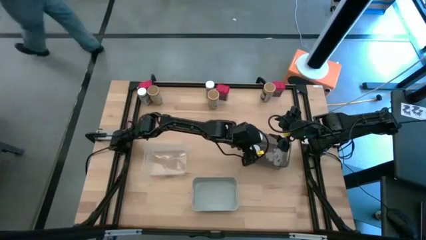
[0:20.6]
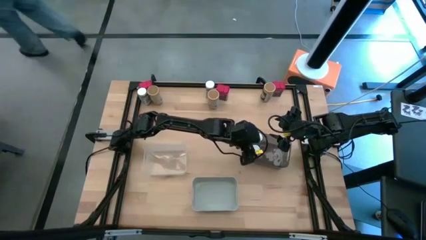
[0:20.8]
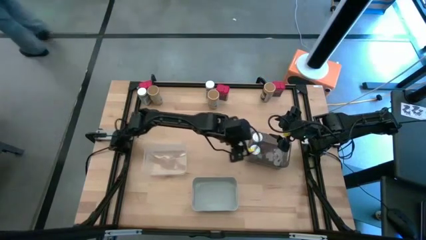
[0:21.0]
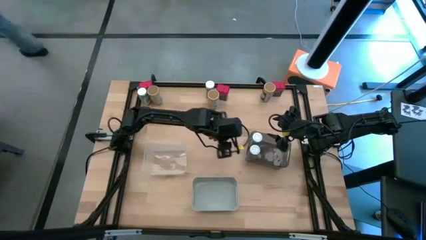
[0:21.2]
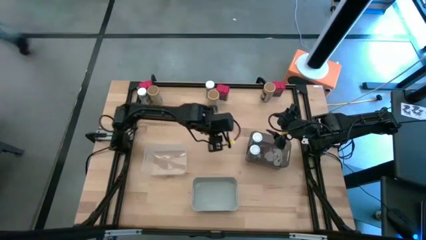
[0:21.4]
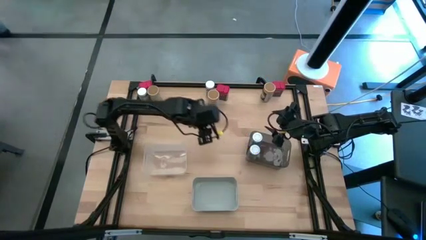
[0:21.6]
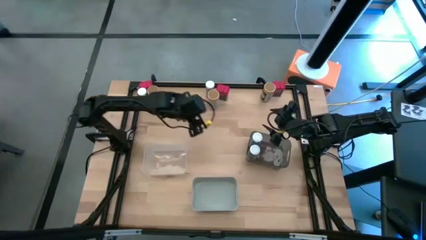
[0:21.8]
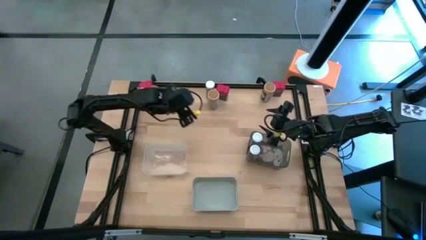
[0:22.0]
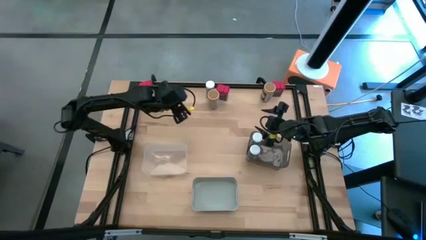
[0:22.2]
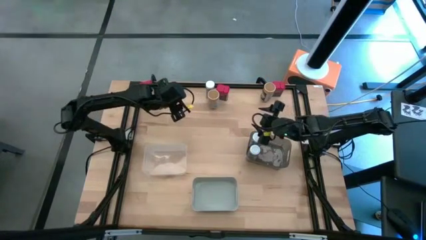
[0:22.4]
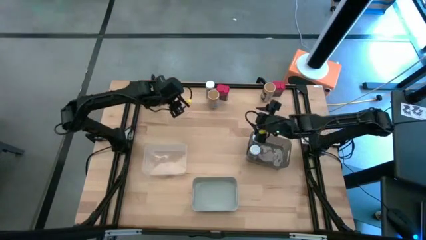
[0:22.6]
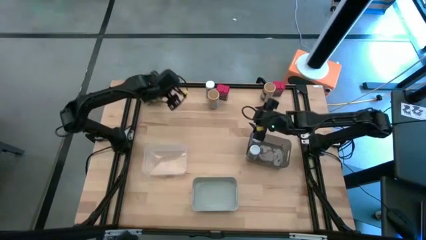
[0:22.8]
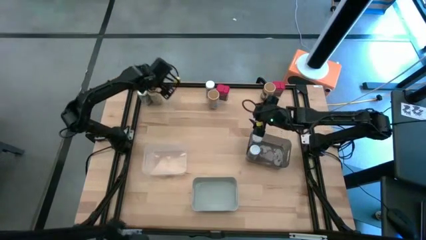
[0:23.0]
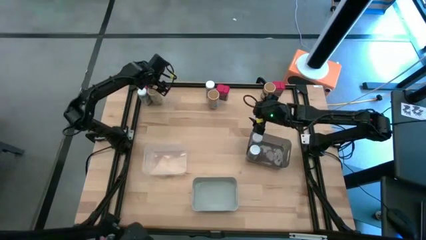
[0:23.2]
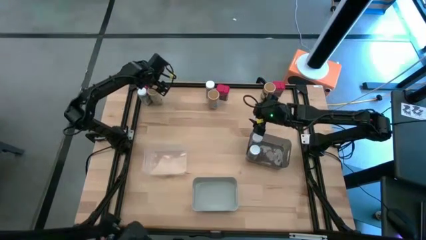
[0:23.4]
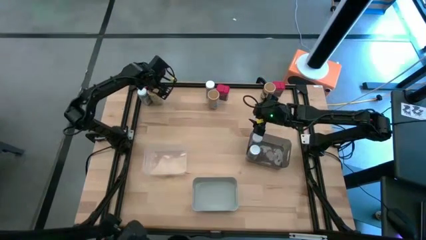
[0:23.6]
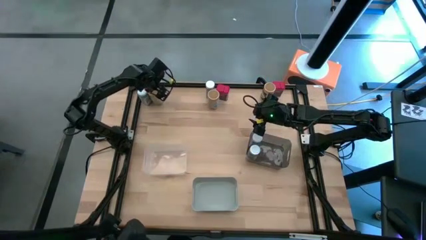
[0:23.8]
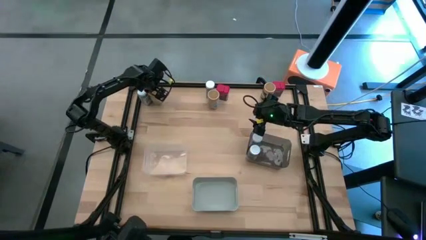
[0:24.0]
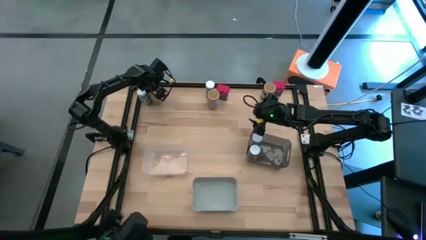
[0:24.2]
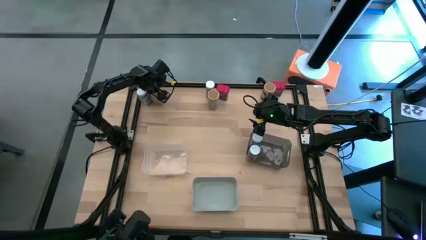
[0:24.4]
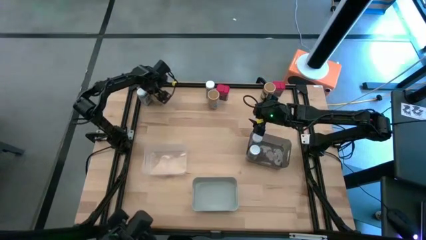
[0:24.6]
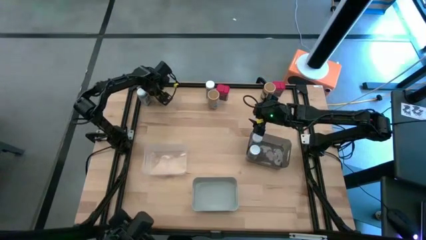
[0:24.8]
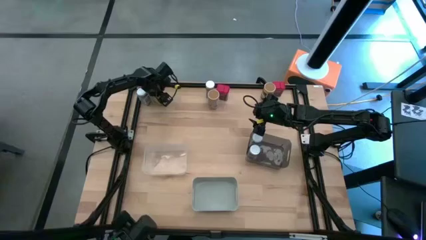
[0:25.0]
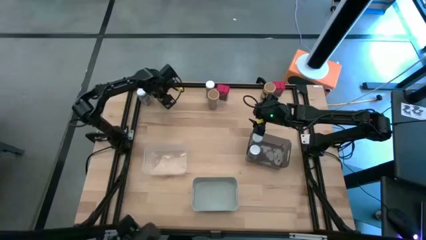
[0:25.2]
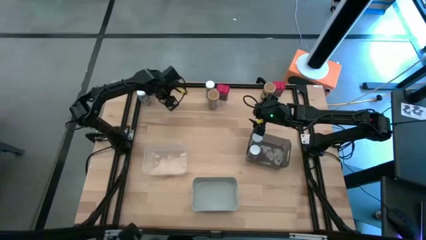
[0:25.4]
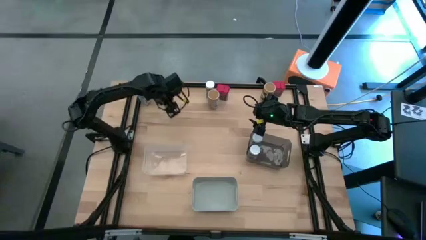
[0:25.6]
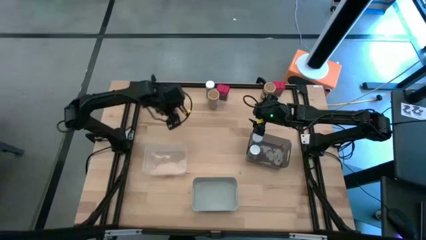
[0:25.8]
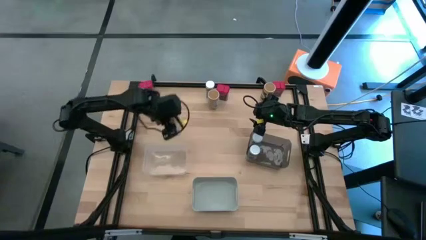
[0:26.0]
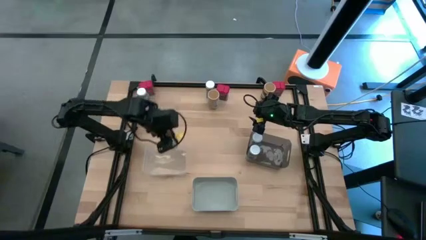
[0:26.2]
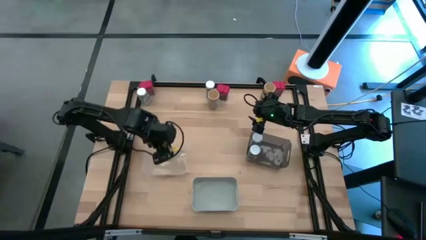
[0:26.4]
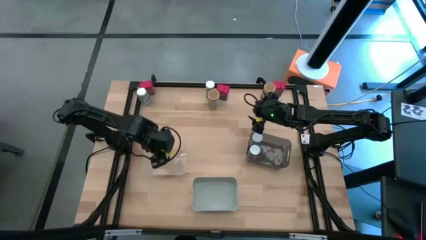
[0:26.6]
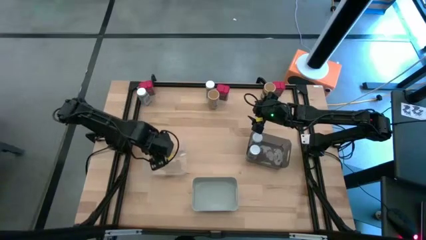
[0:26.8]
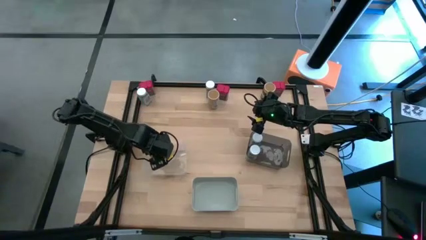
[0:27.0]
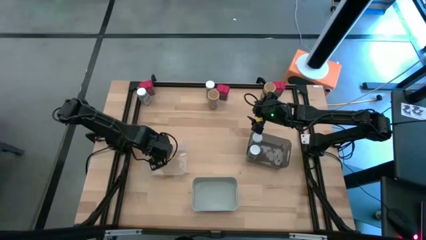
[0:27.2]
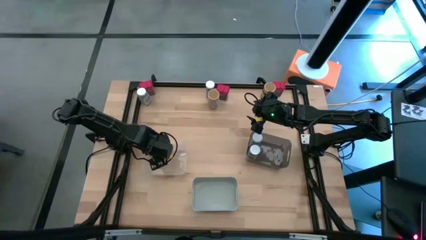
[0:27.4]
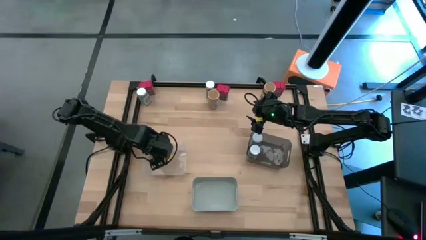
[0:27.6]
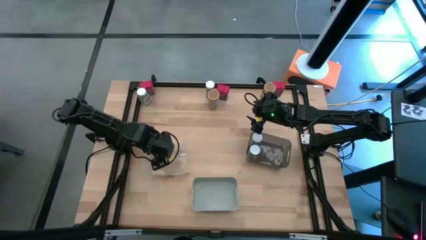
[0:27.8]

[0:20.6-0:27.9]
Task: Sort spices by type
Put the gold seasoning bottle into the transparent bin

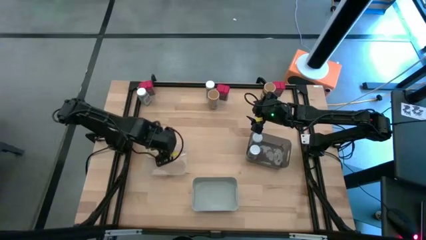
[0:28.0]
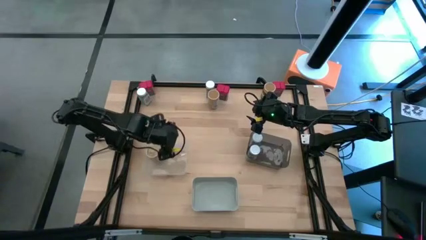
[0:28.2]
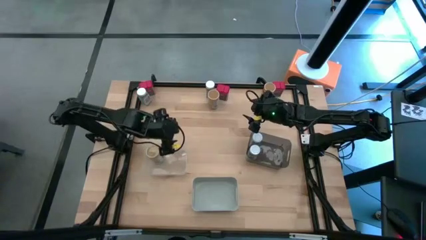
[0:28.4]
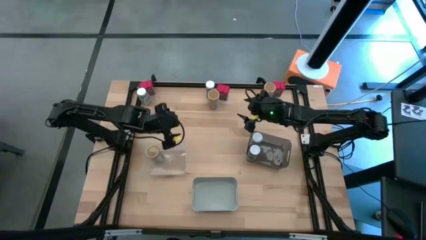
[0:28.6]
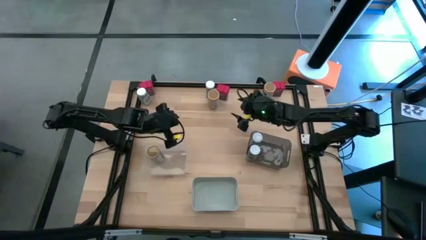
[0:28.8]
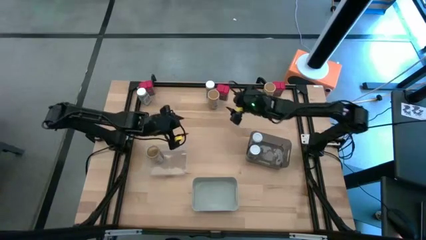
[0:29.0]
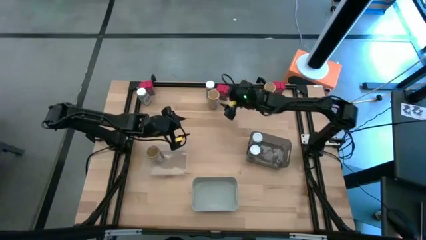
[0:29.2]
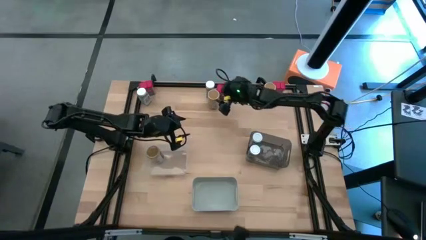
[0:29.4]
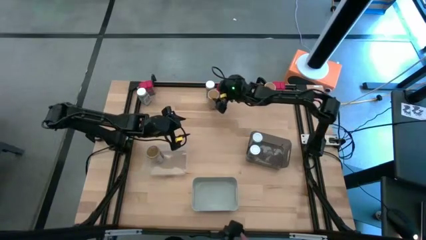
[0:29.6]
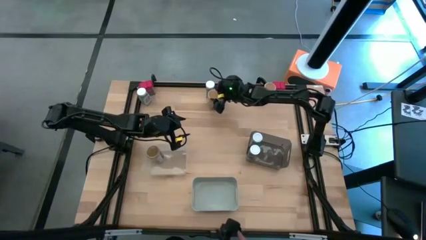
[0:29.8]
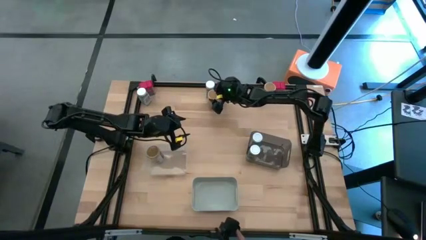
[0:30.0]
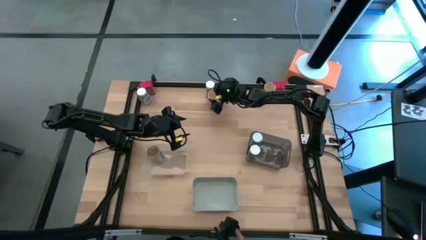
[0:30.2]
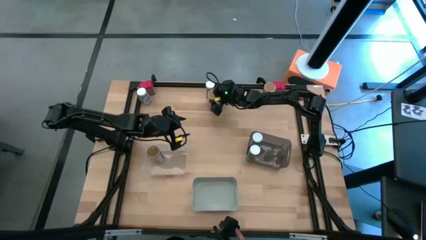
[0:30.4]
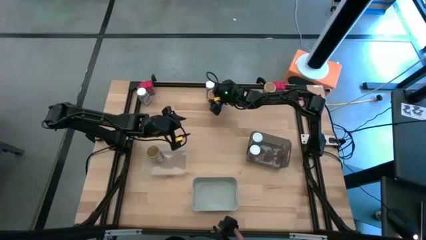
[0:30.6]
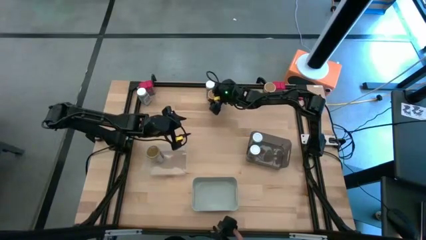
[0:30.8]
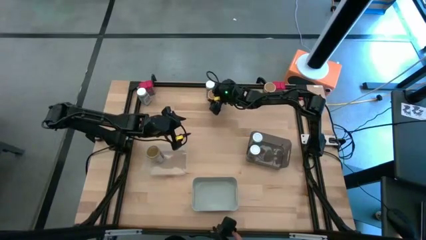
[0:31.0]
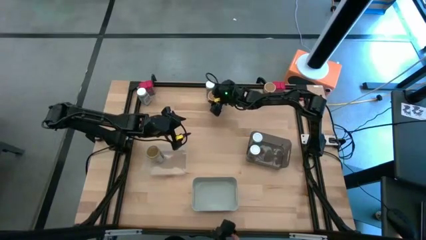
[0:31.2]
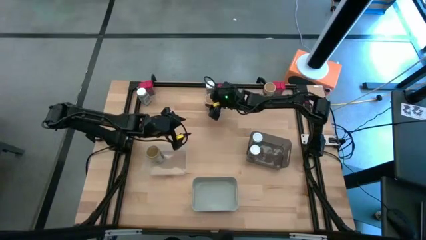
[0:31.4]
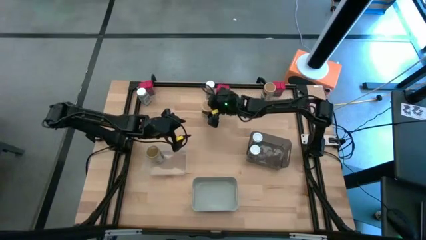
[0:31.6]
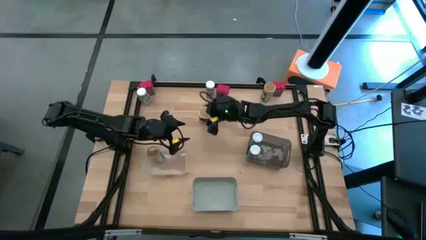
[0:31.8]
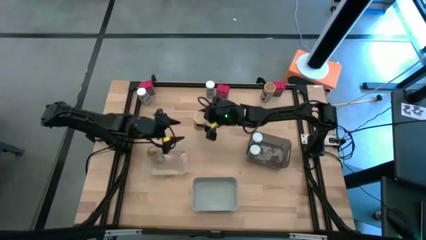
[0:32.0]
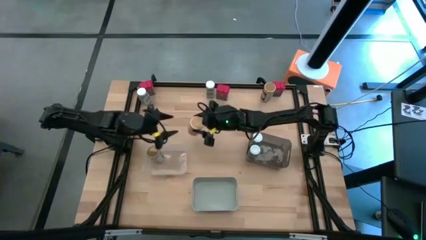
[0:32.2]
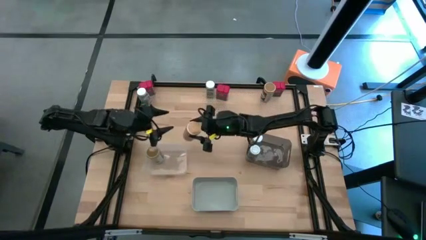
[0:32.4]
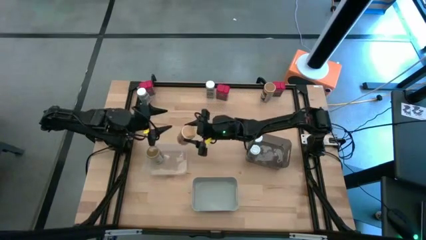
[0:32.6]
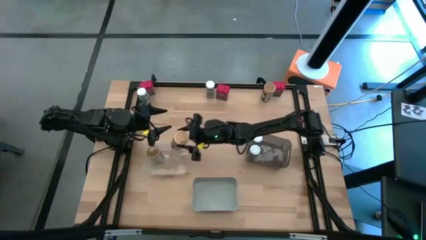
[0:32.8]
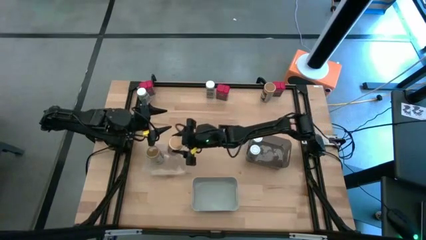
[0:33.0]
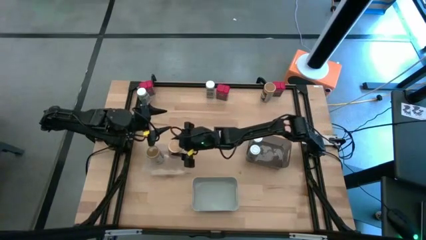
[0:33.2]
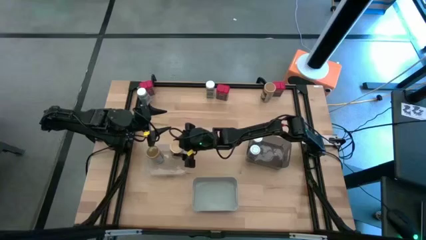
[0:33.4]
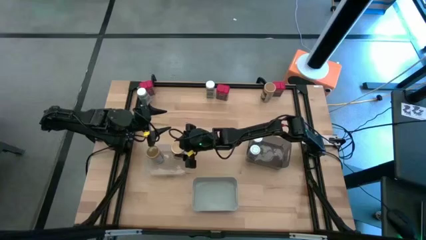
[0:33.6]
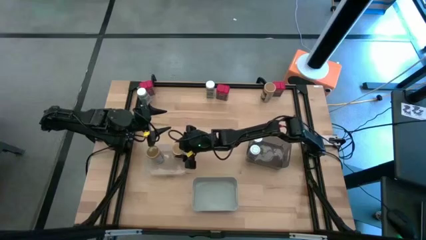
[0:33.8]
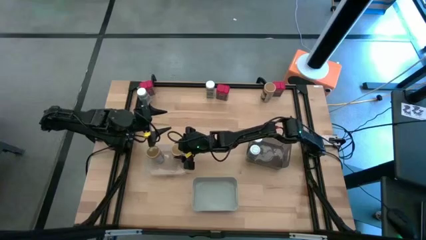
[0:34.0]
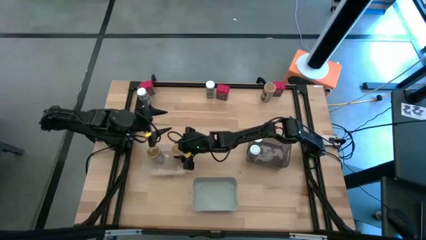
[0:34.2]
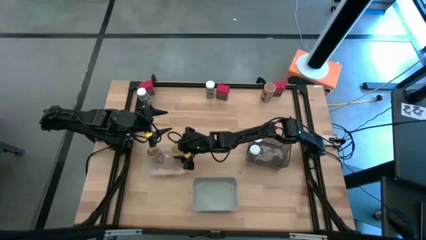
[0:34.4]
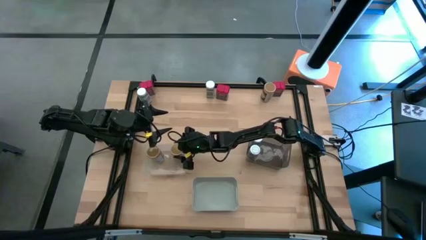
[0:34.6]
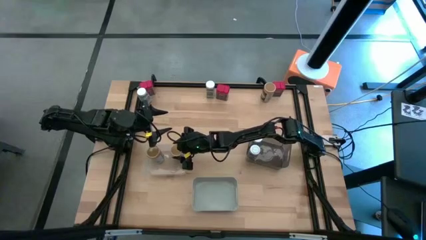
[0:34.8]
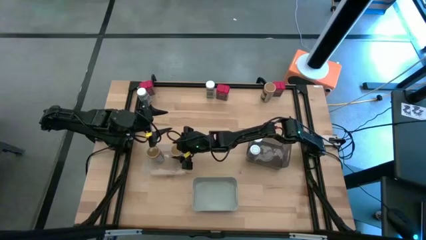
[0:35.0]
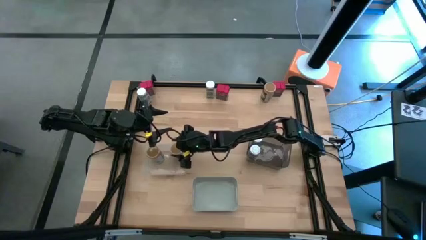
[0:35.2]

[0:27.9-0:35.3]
Put the gold seasoning bottle into the transparent bin

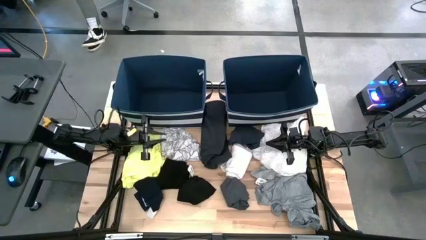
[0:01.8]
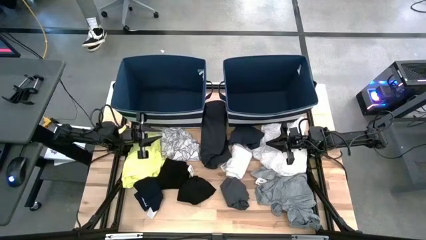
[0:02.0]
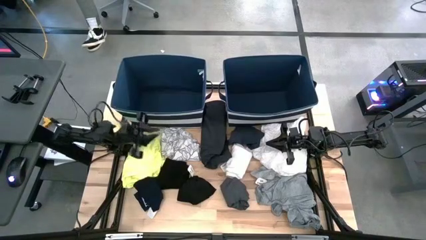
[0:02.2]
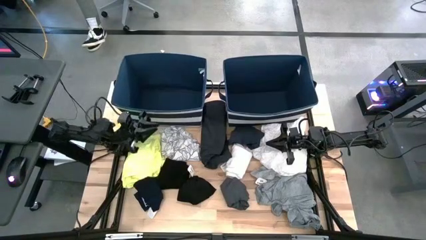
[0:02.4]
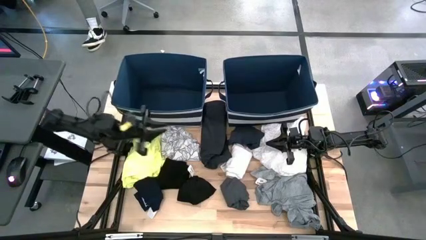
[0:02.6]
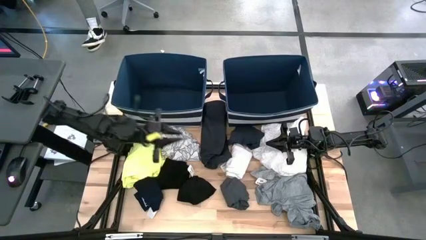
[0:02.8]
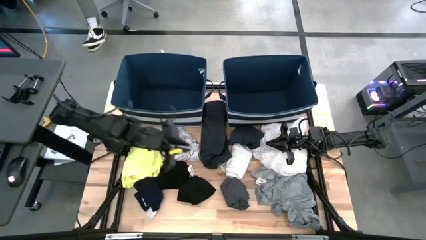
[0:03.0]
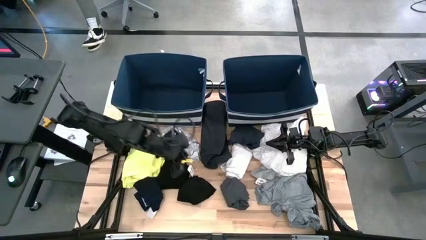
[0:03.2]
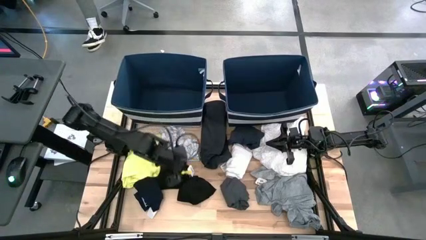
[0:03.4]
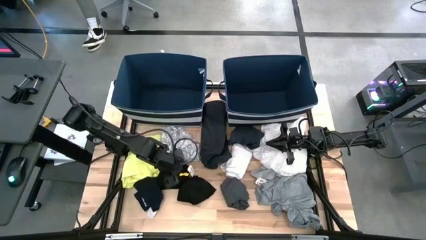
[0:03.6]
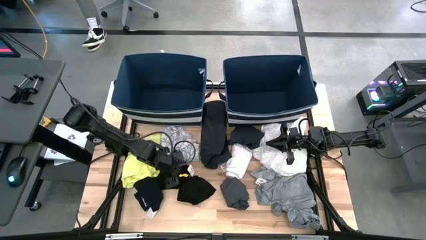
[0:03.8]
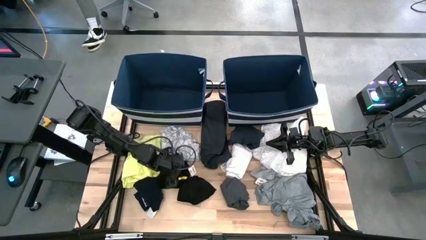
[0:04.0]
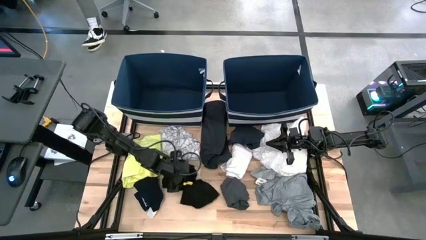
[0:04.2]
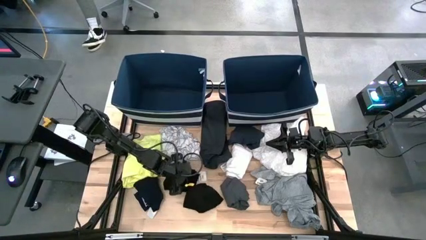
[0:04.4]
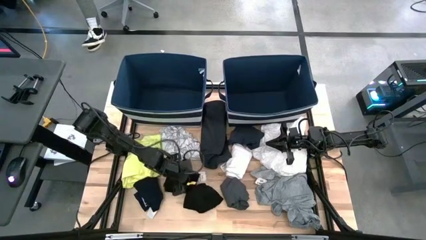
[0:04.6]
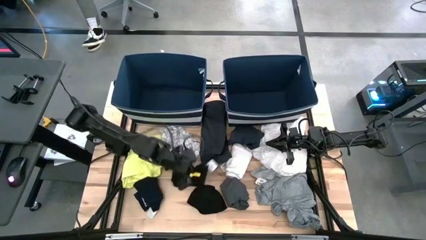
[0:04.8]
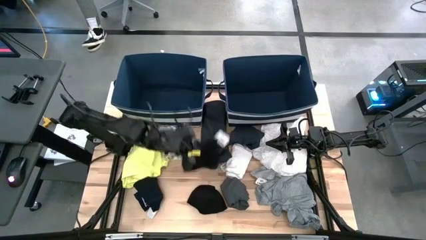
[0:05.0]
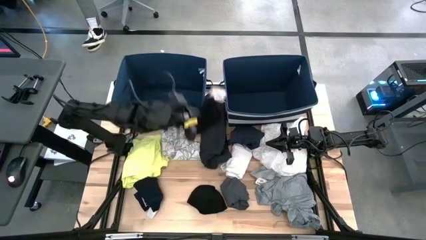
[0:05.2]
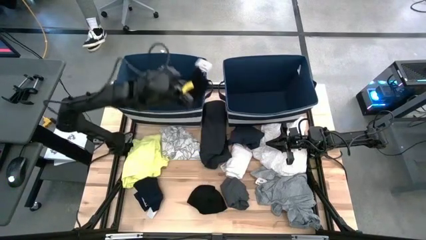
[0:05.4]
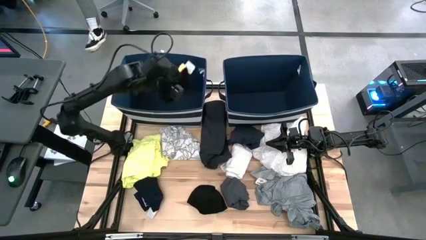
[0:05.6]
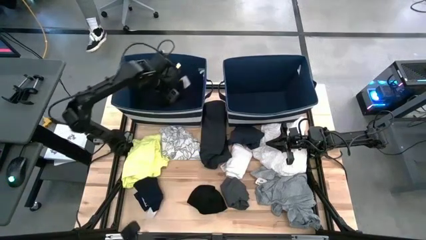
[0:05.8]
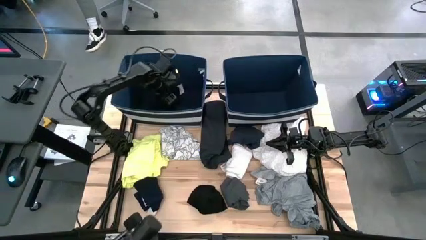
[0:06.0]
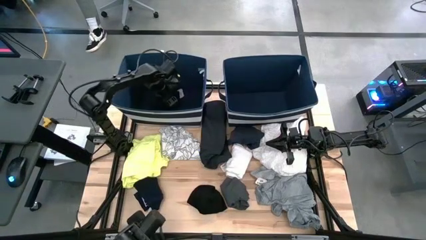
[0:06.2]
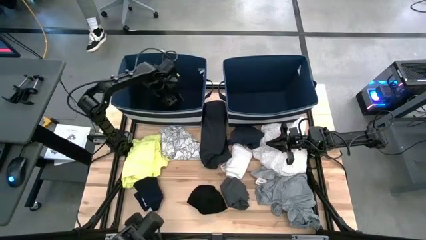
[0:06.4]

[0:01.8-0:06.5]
Task: Sort clothes
Put the black shorts into the left blue laundry bin
